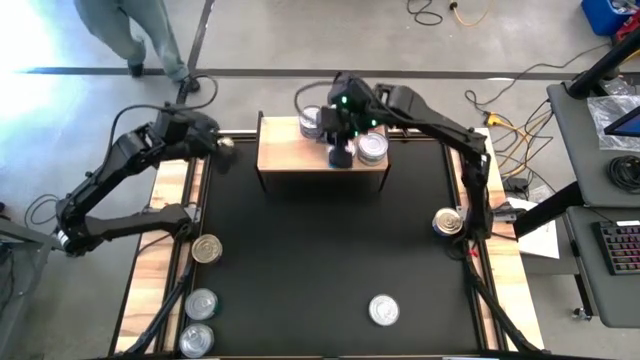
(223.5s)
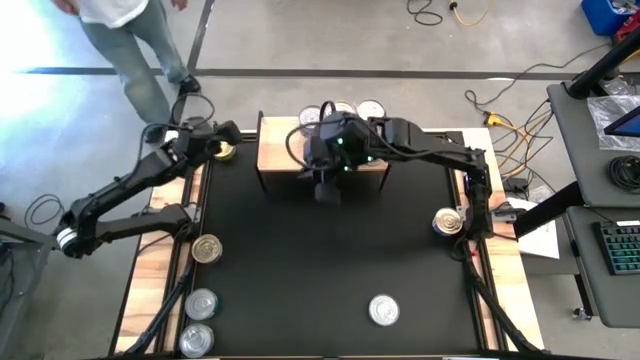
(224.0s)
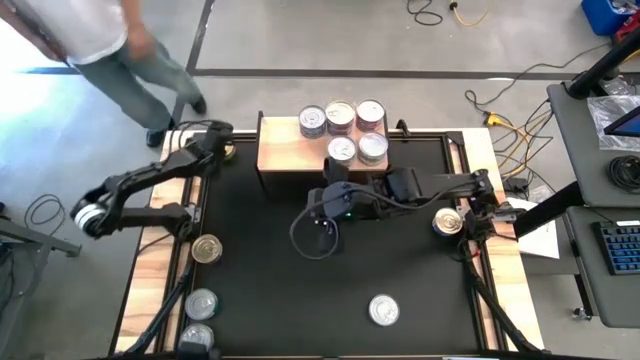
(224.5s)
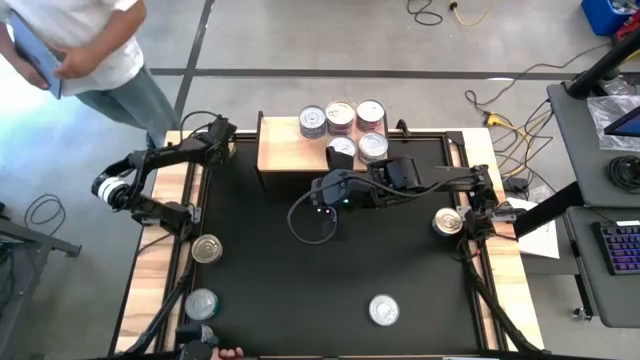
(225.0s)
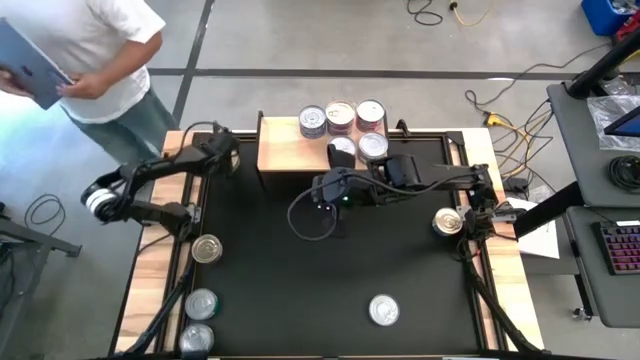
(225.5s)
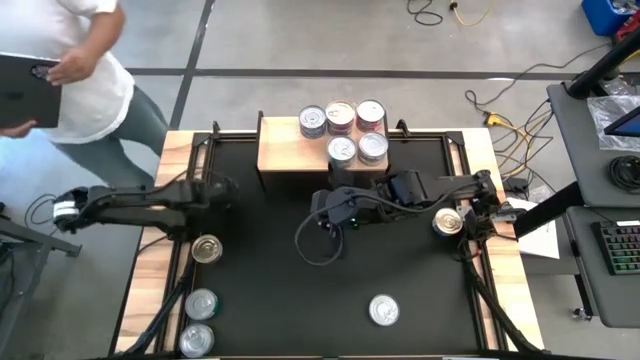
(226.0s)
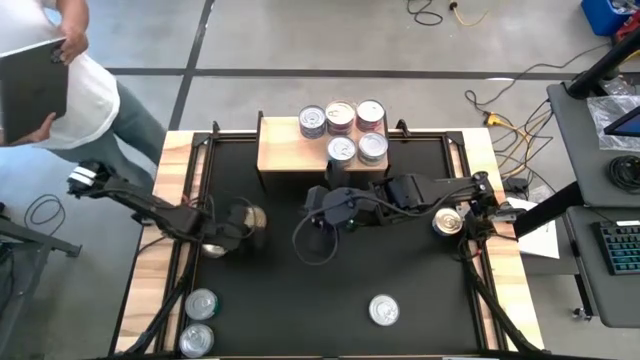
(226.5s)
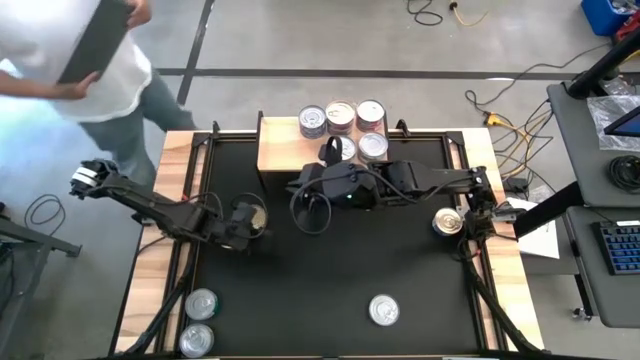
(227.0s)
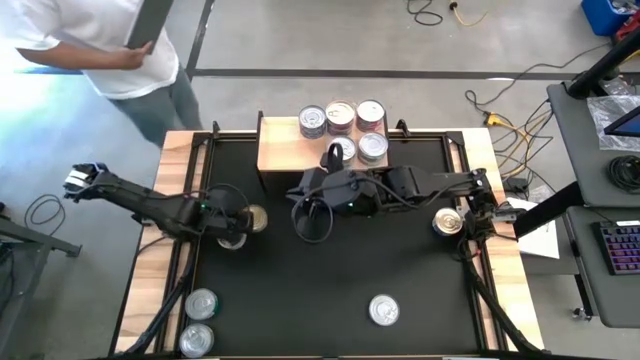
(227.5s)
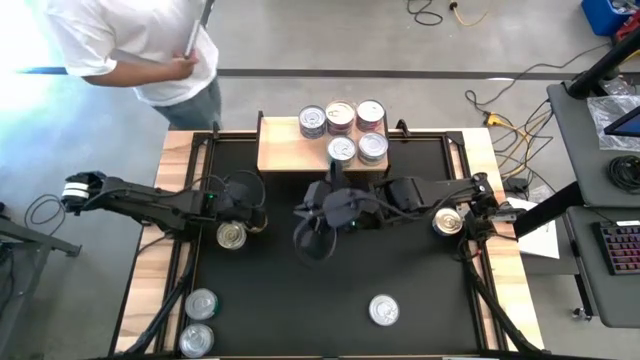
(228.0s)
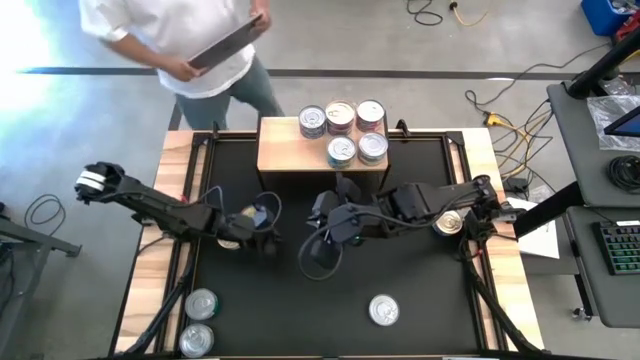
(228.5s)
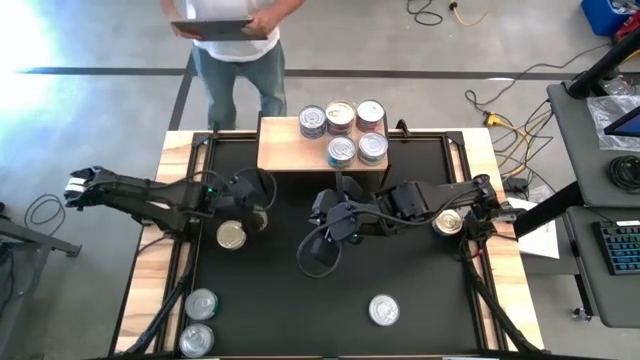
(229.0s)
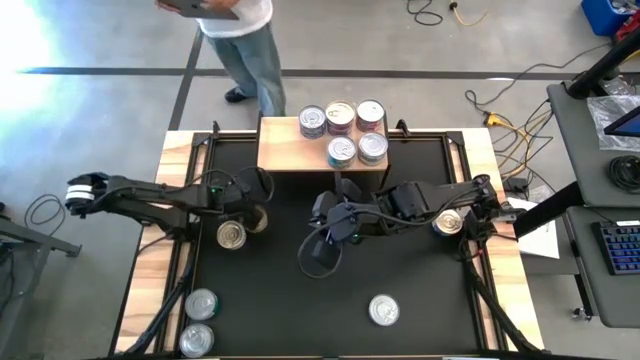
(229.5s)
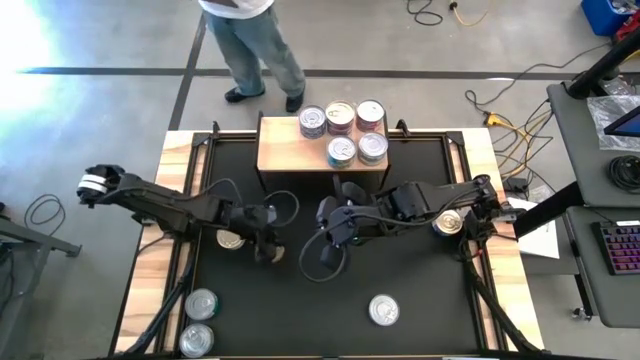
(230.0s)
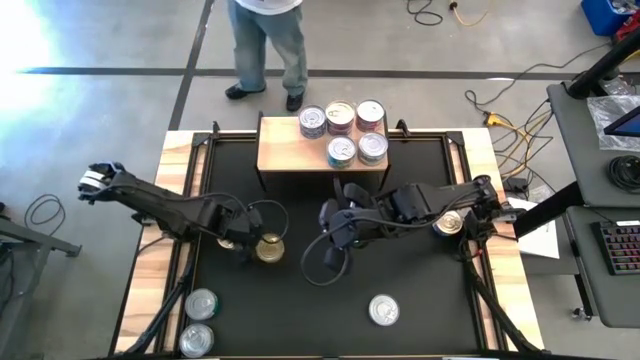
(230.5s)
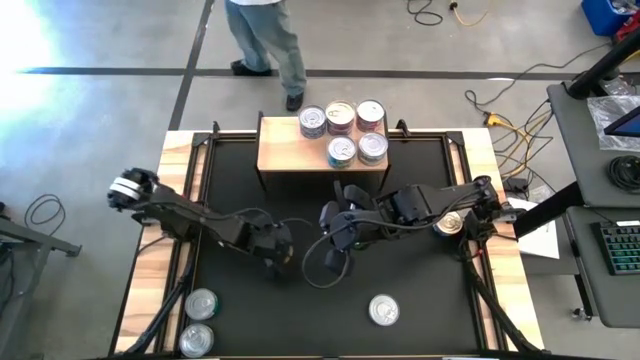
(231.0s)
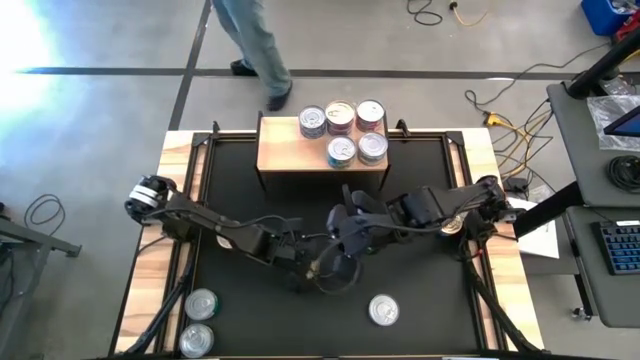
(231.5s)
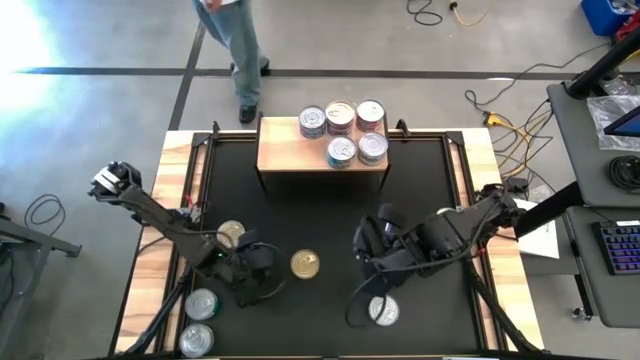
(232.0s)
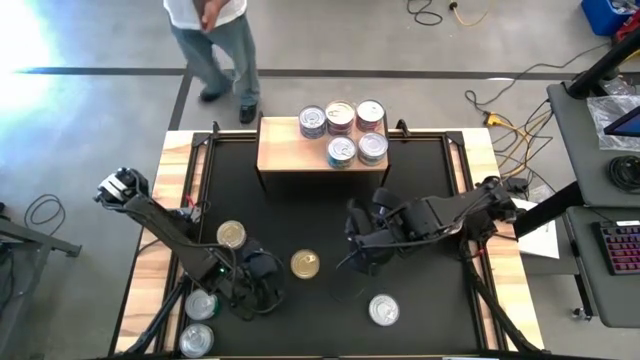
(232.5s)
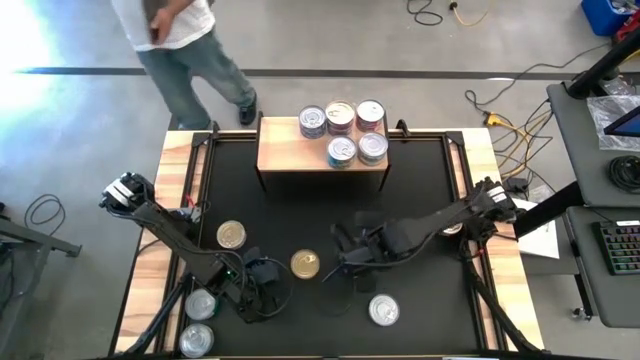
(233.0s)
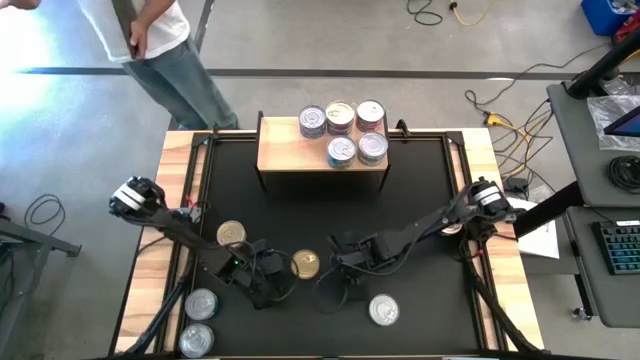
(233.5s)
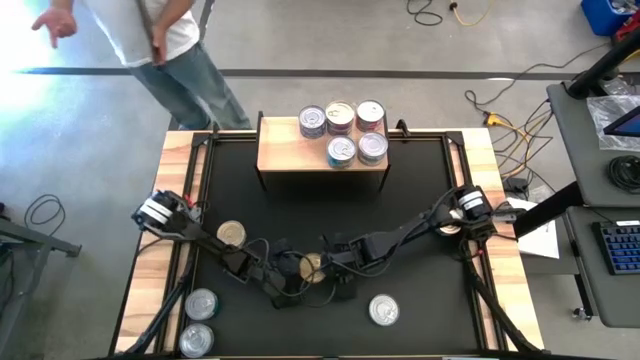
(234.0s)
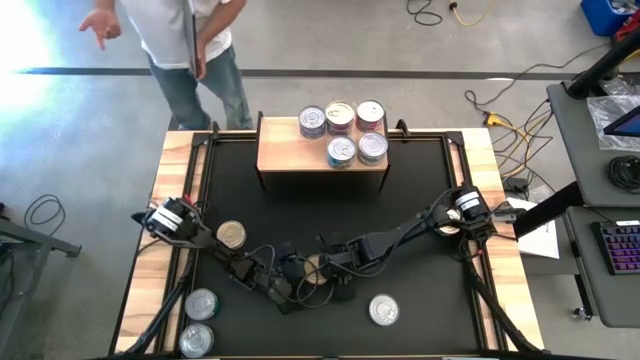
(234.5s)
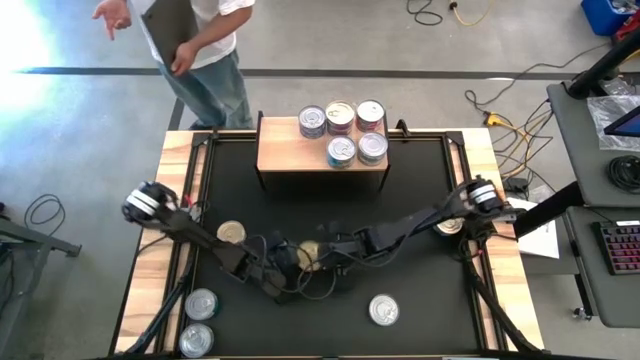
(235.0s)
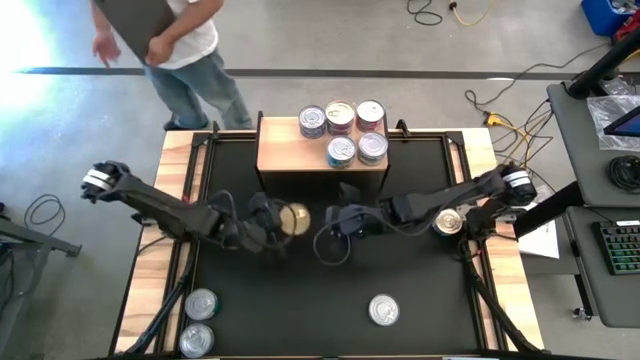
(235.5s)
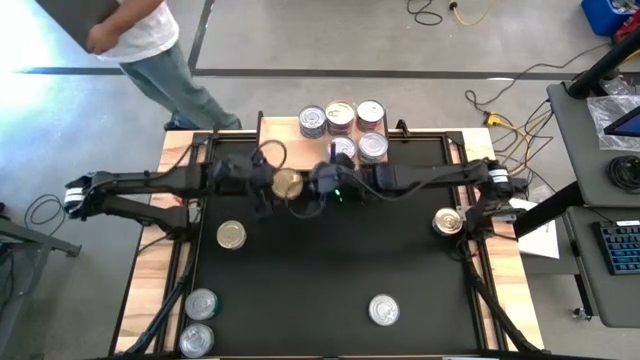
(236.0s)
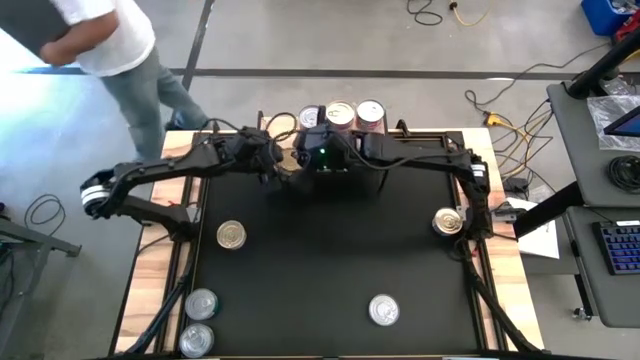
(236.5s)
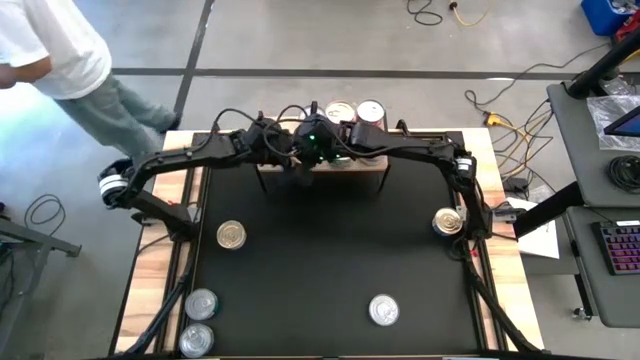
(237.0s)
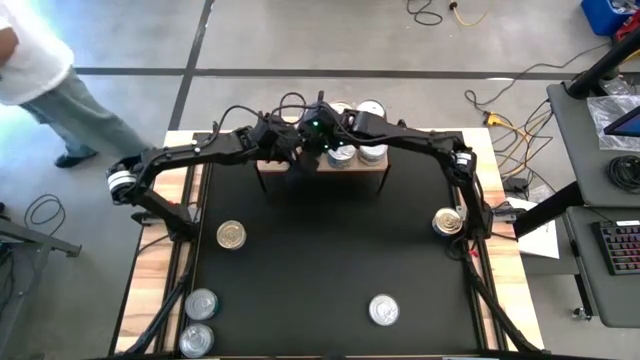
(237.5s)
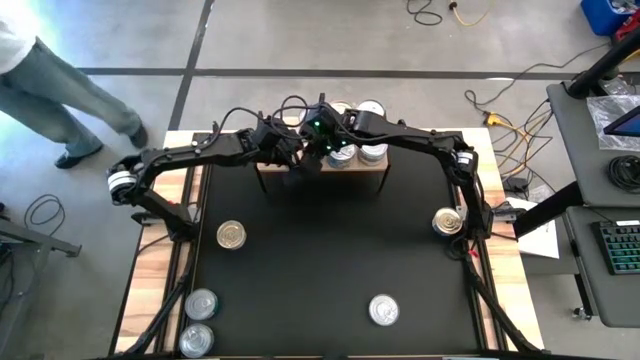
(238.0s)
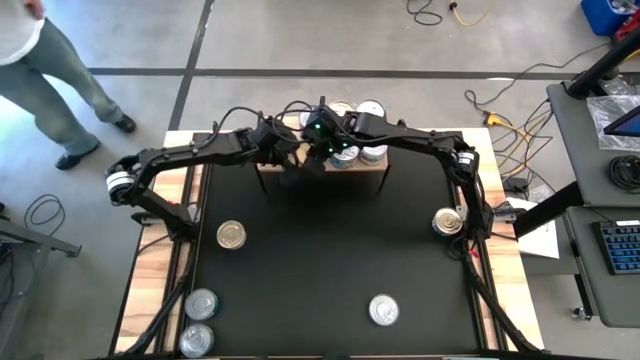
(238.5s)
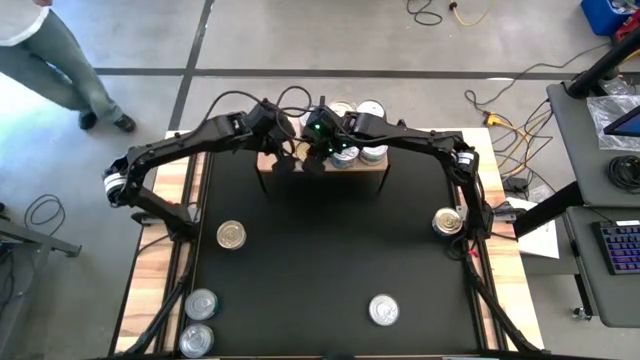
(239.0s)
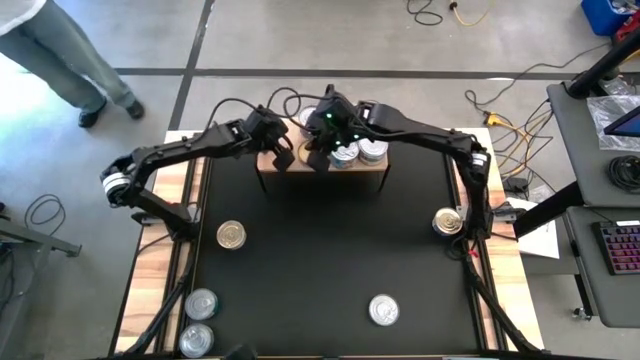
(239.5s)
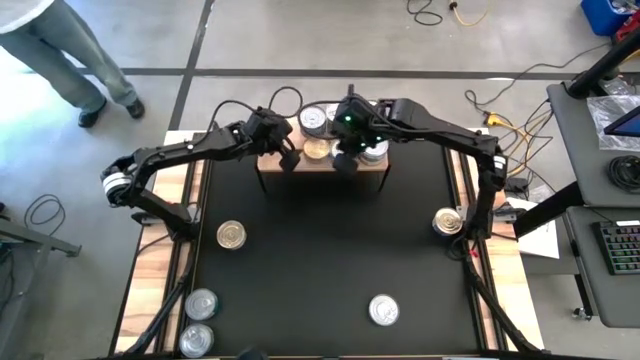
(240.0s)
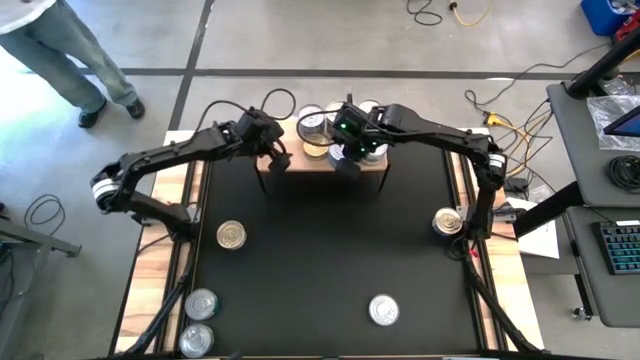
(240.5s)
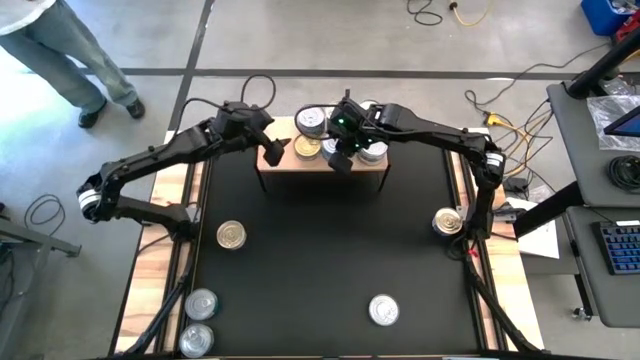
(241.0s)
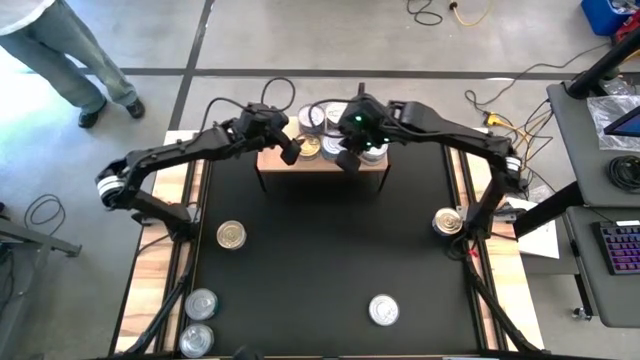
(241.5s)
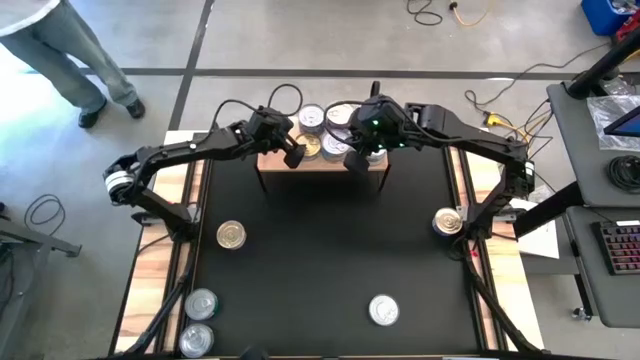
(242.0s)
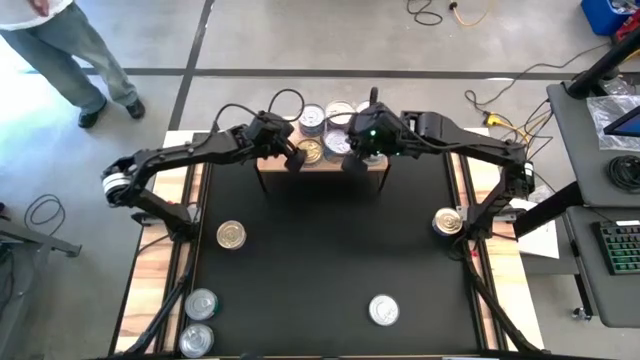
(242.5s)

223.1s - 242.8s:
Task: Stack canned seafood by type on shelf
Put the green tuna can on the shelf

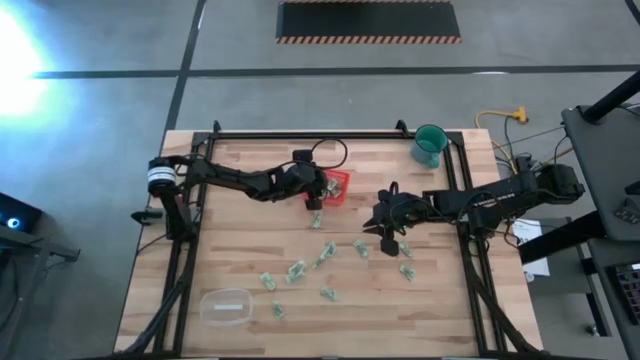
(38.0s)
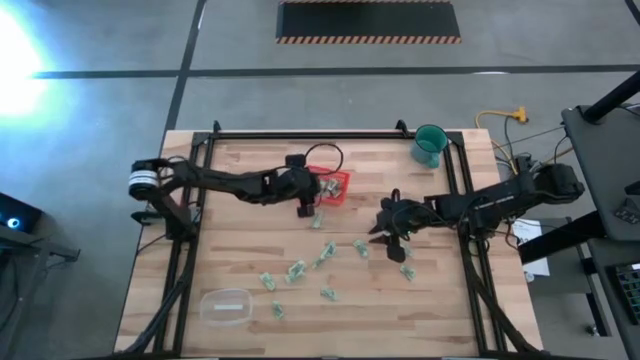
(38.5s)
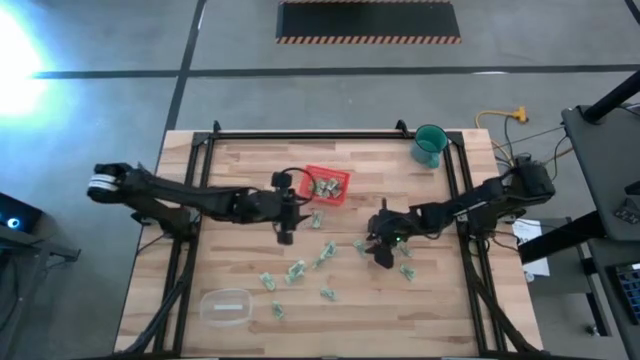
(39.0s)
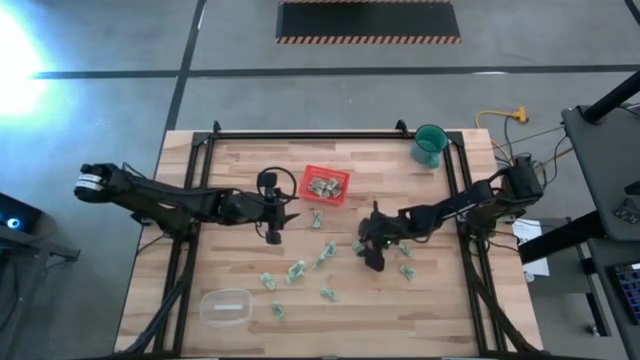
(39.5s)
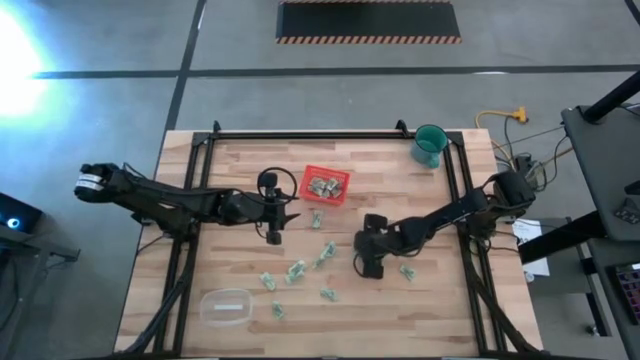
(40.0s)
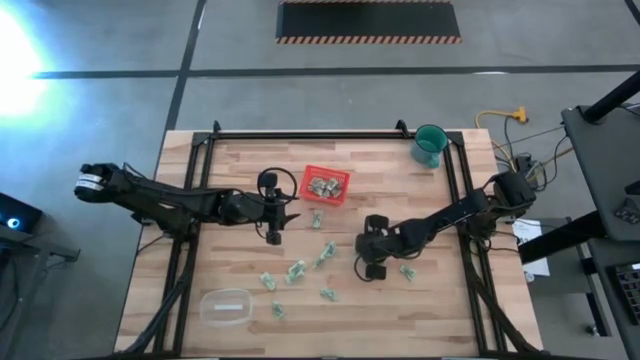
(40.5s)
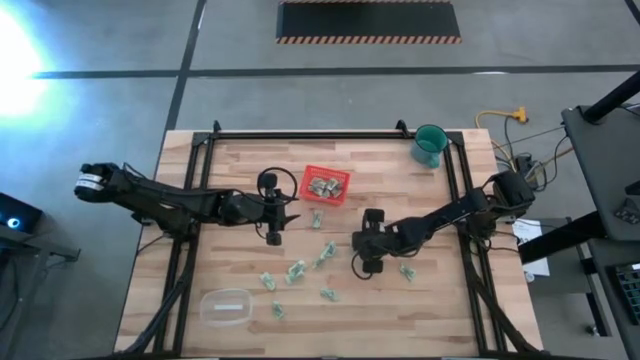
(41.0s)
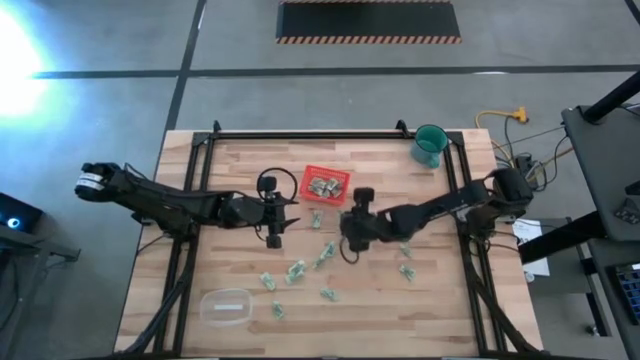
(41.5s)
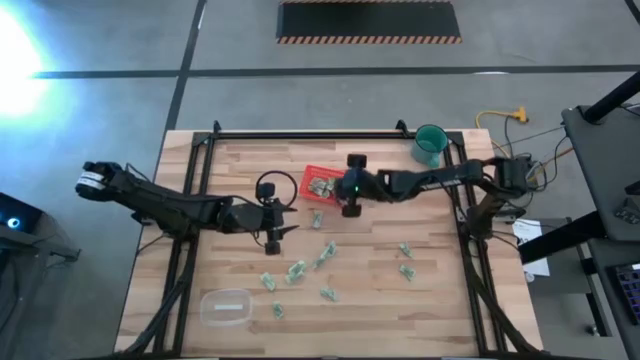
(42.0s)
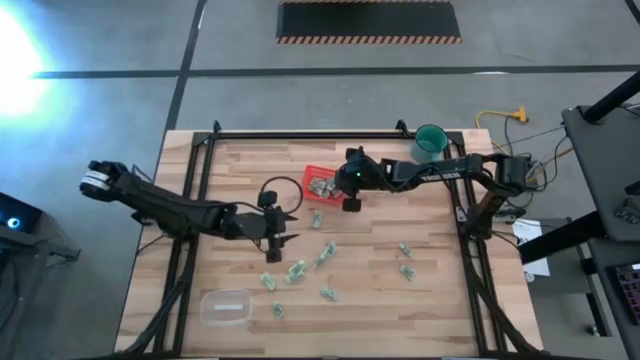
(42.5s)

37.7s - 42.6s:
Task: Pick and place items into bin
Put the stevia packet into the orange bin
